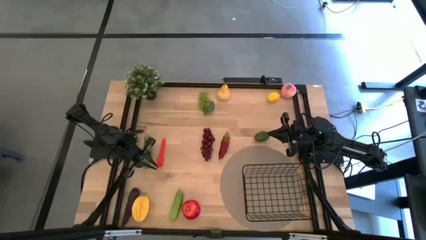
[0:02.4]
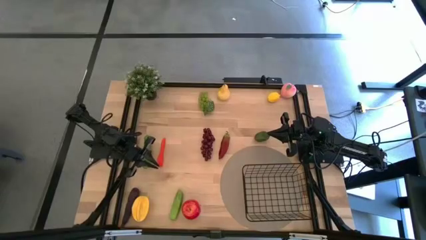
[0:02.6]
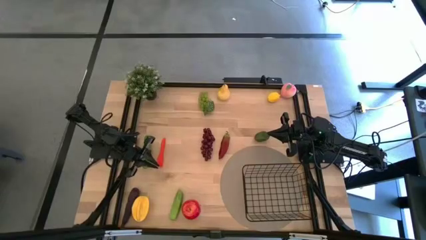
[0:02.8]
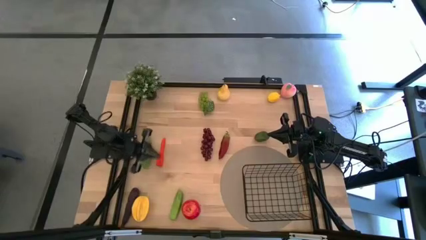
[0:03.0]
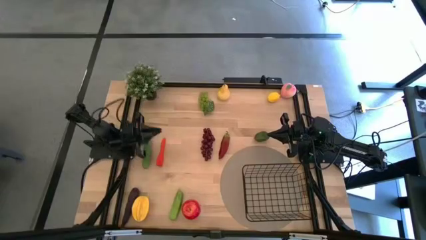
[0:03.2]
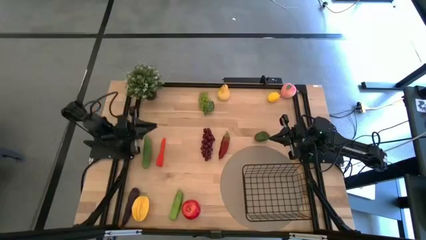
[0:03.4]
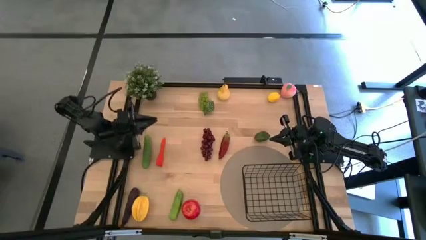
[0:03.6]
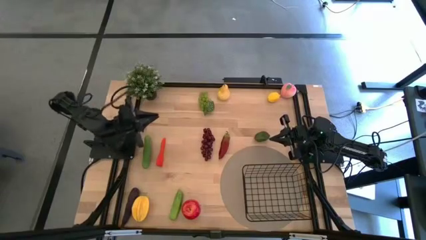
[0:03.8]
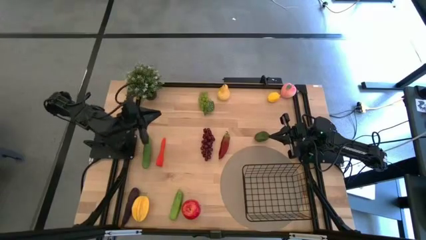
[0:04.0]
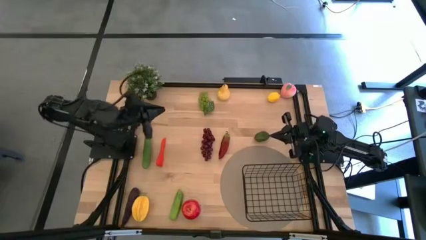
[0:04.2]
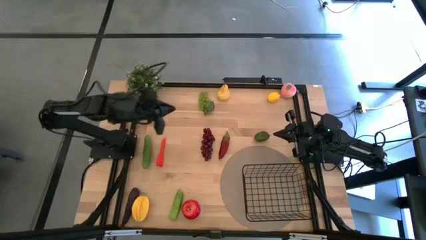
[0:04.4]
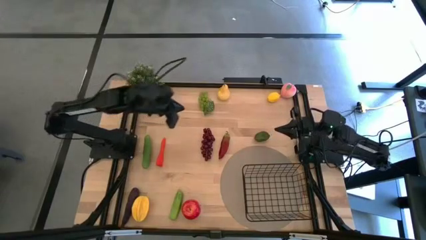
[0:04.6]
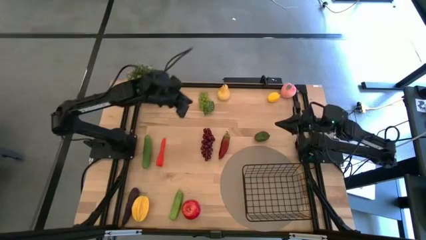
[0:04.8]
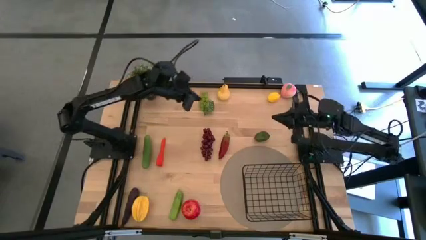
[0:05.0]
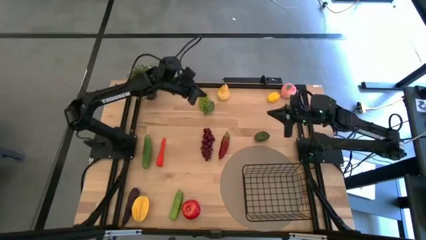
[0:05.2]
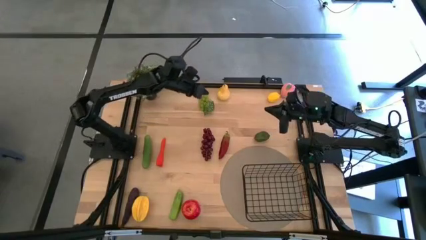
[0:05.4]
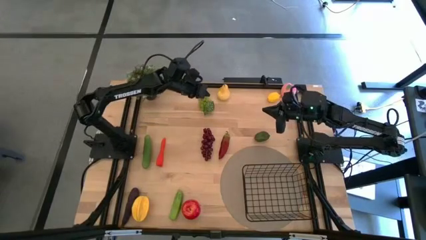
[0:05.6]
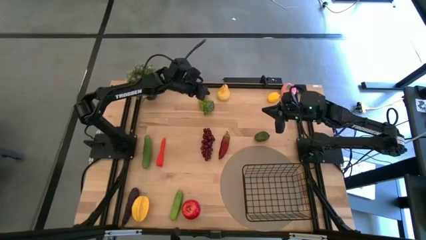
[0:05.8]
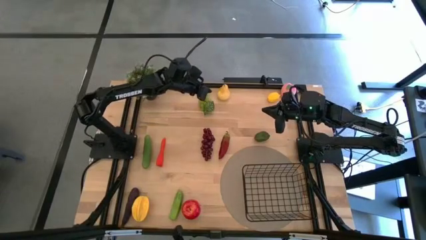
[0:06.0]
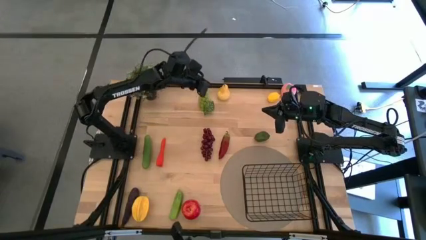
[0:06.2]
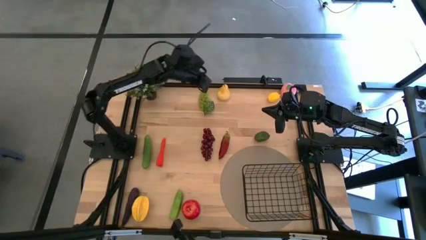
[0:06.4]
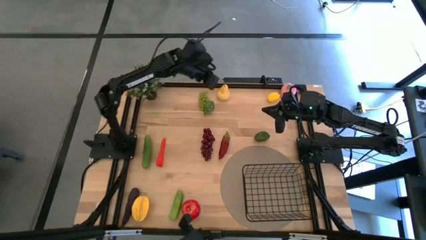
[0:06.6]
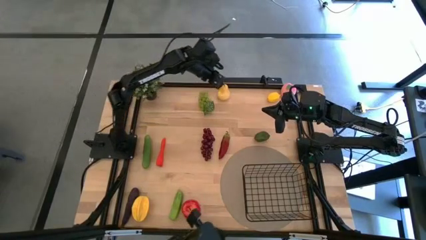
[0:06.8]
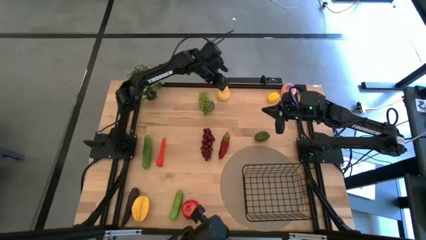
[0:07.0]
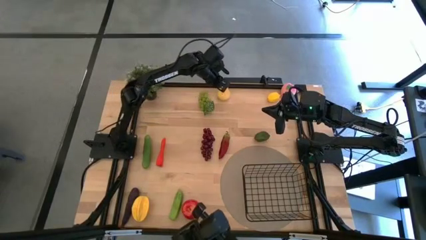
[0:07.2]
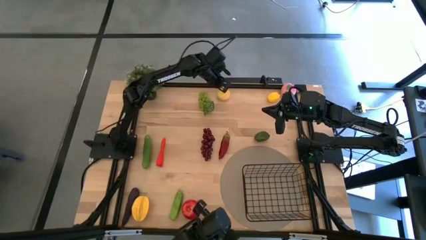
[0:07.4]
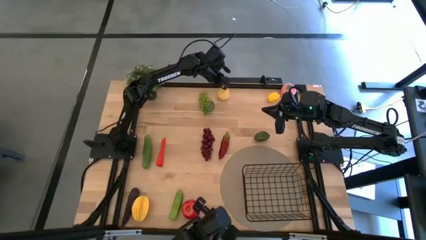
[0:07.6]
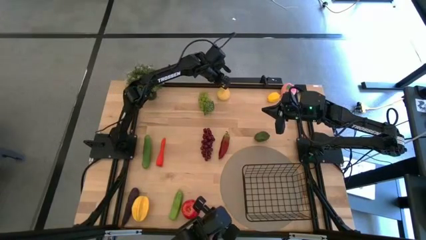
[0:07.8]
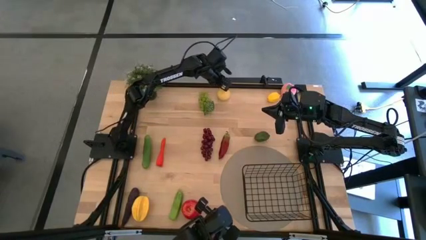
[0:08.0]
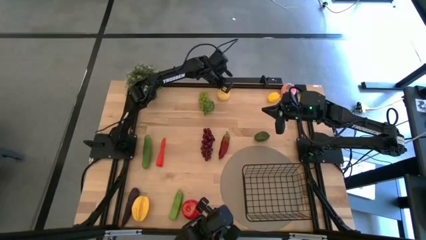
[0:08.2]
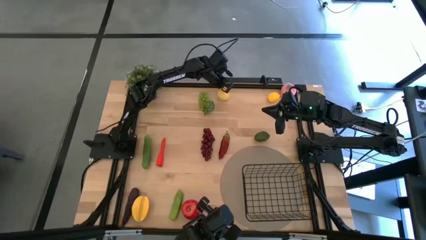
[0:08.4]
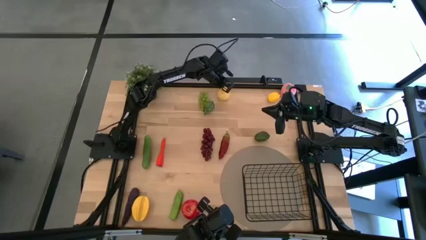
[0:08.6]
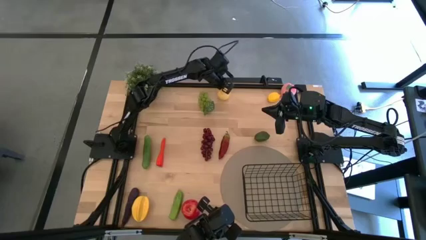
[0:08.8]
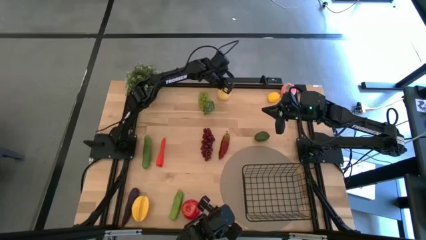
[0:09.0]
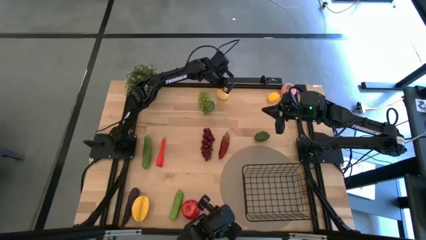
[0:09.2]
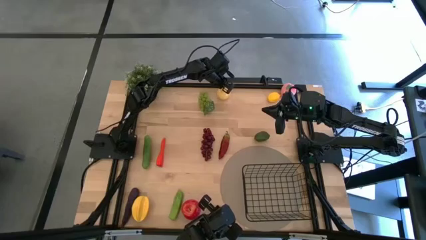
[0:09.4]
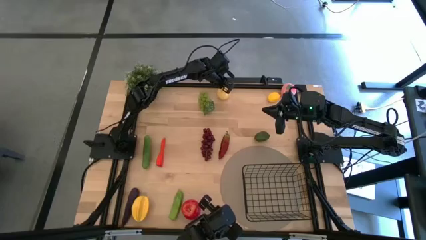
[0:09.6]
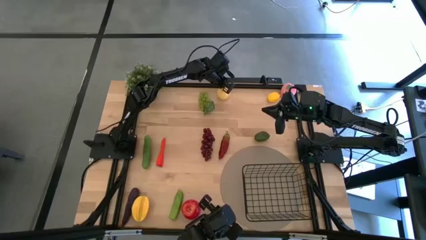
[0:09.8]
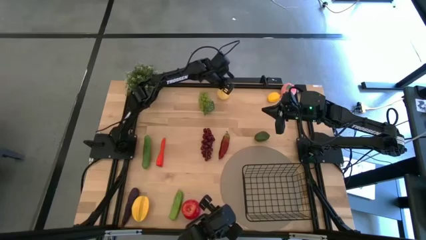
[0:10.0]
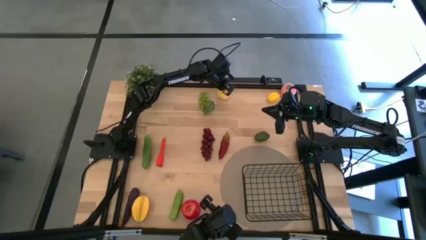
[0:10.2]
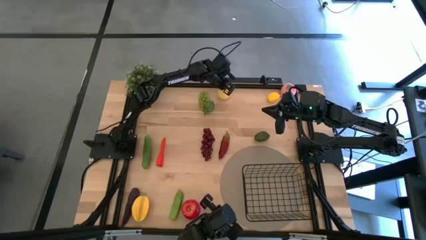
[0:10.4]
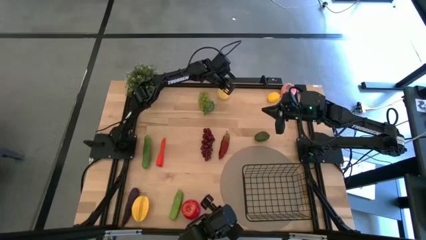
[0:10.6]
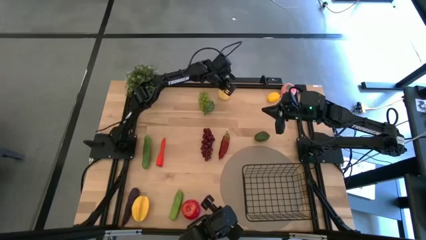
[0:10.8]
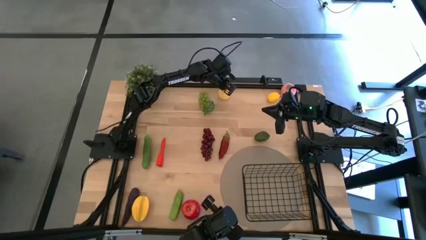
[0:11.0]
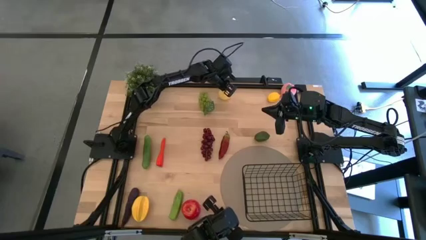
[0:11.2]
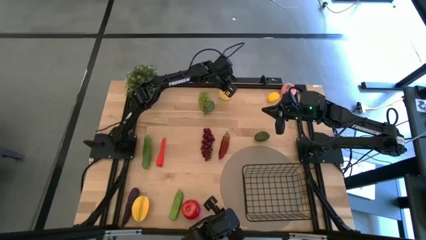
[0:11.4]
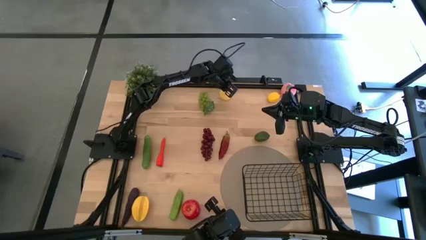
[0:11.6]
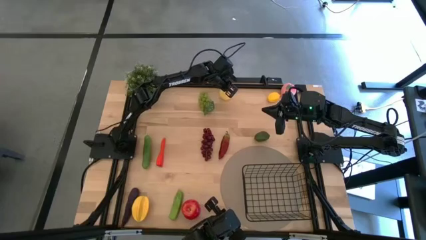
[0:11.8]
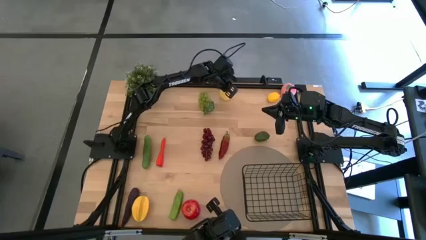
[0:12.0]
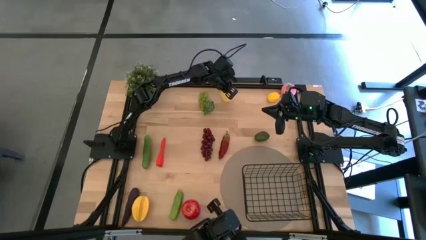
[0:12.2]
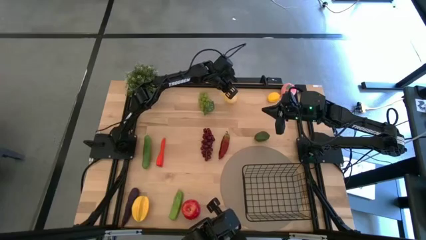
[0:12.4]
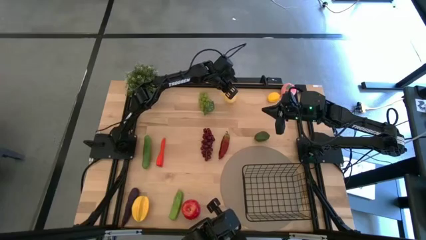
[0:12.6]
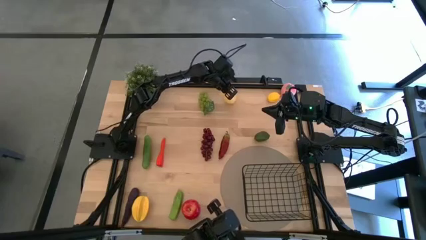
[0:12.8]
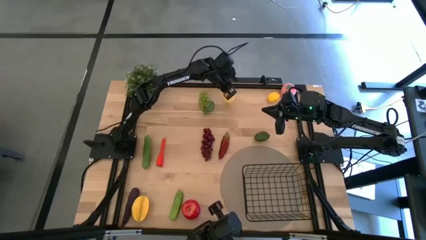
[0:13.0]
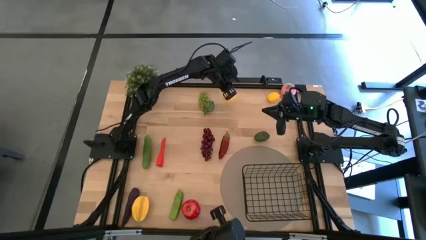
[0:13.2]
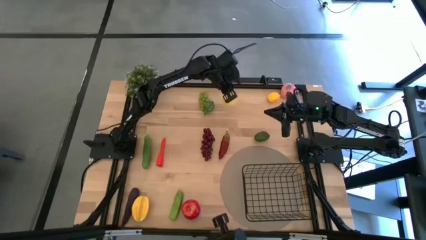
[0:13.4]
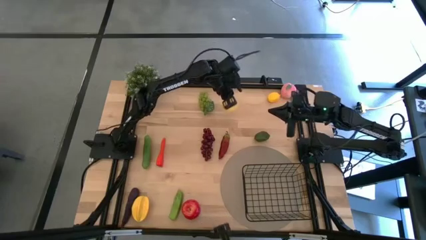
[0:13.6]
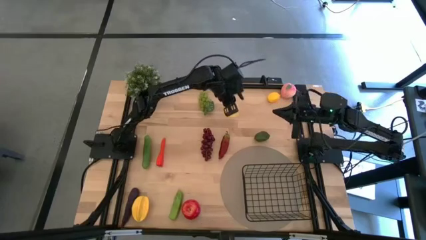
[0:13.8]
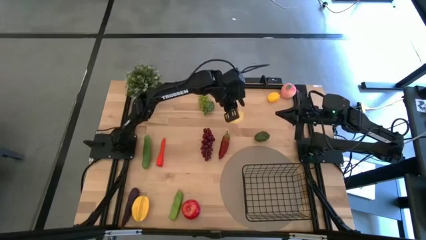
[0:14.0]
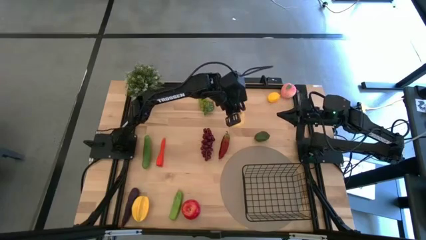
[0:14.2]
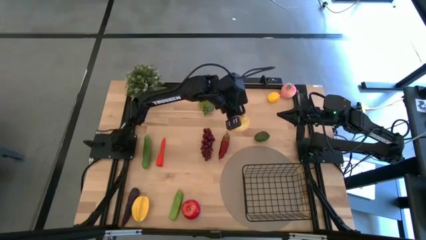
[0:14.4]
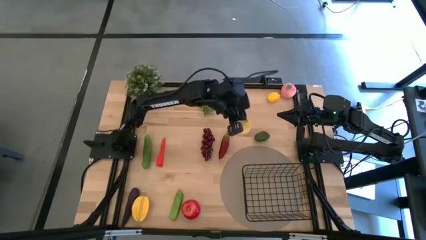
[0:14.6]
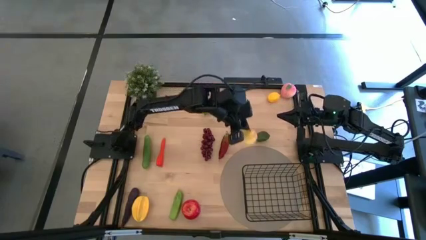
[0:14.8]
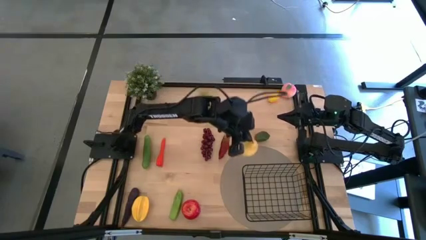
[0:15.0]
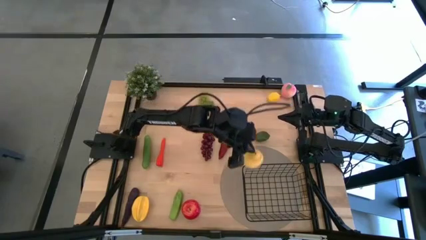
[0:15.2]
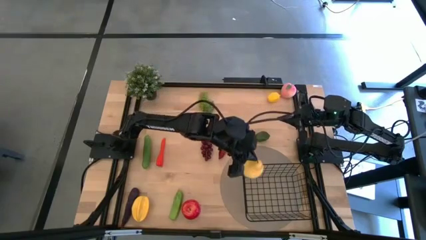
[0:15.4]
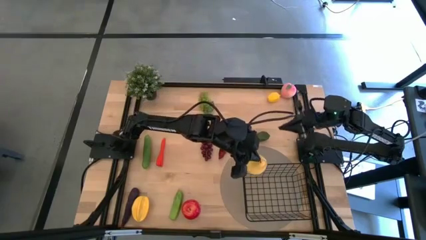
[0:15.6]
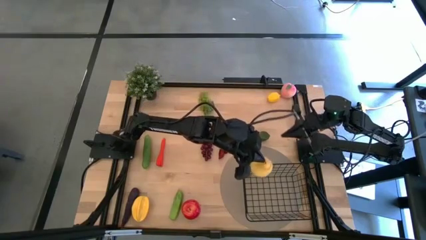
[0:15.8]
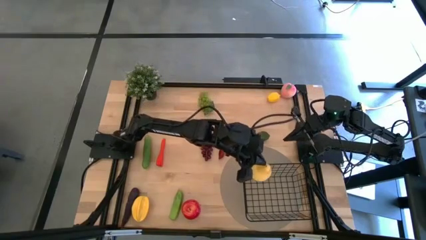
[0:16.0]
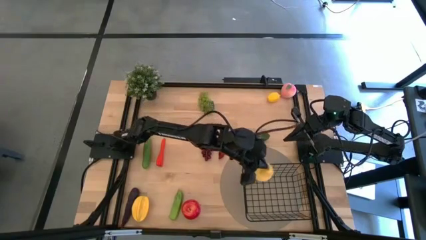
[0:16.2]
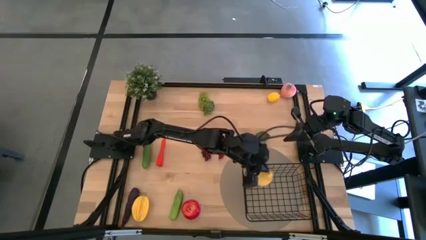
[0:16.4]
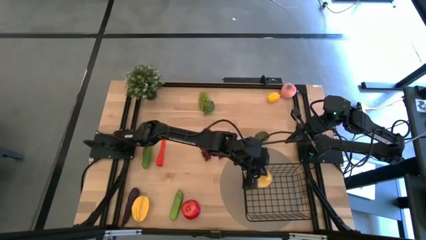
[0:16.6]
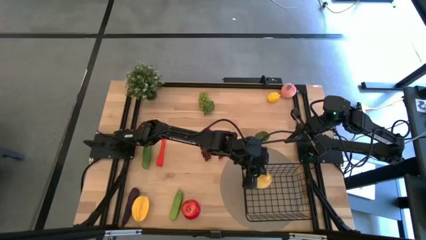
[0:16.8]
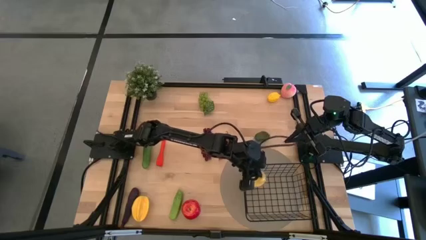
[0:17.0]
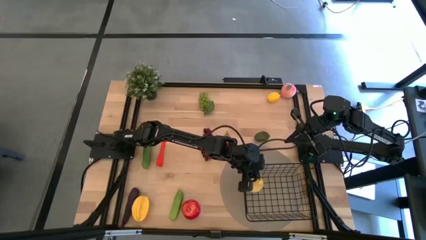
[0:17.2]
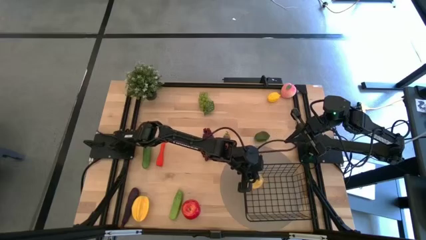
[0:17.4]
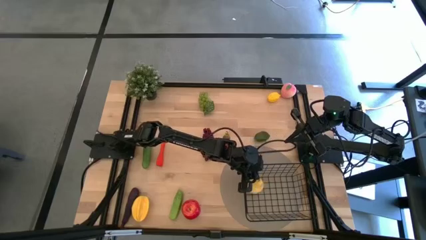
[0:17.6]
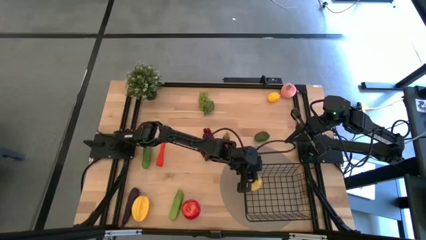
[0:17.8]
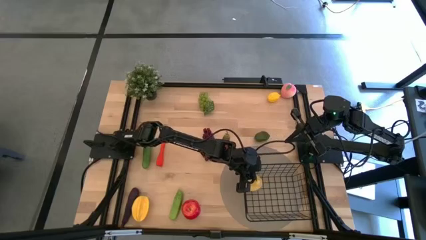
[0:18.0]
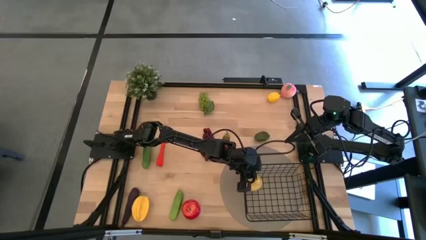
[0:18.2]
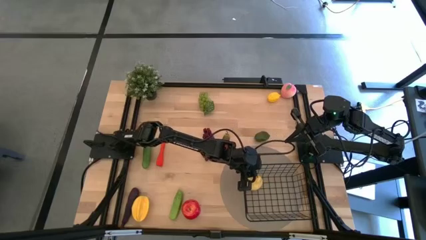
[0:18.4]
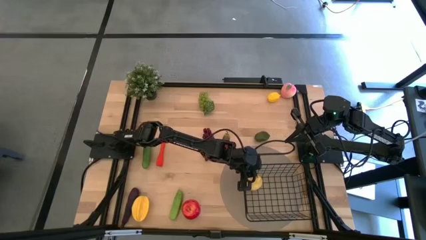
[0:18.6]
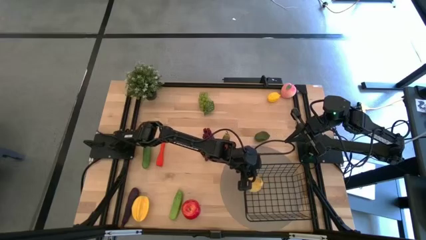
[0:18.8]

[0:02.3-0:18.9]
Task: Build produce basket
Put the pear into the wire basket
